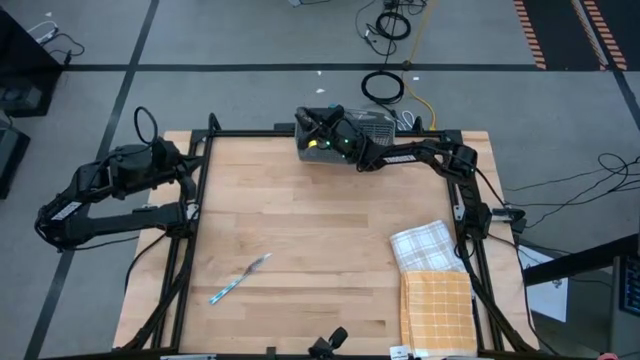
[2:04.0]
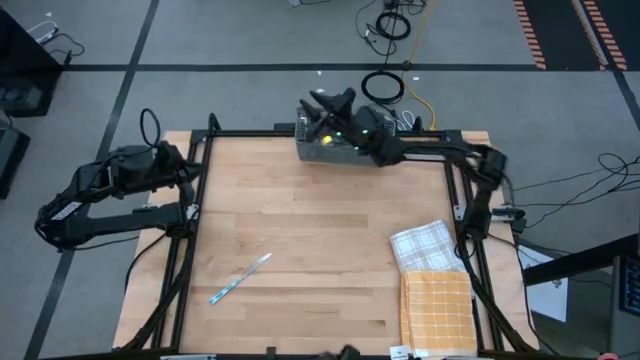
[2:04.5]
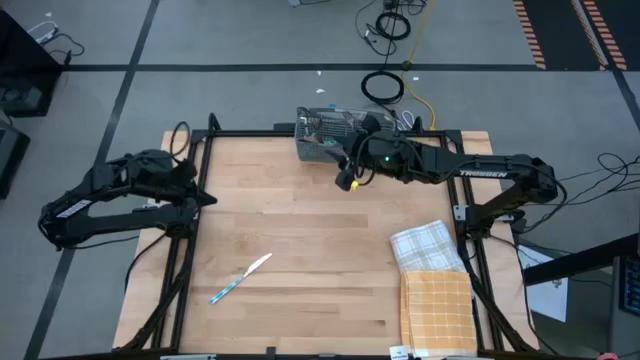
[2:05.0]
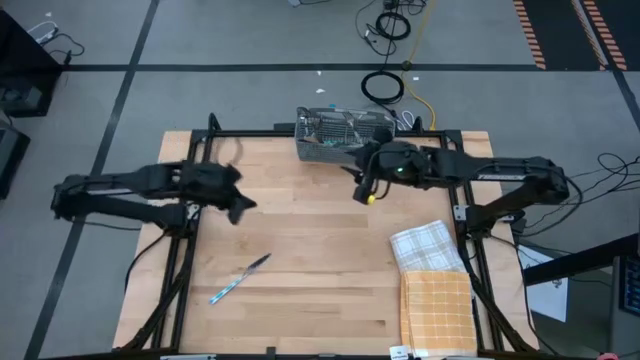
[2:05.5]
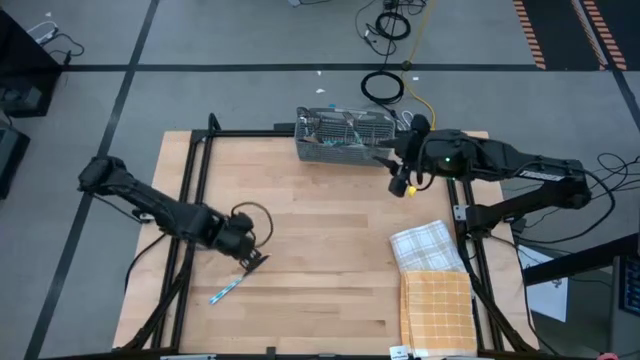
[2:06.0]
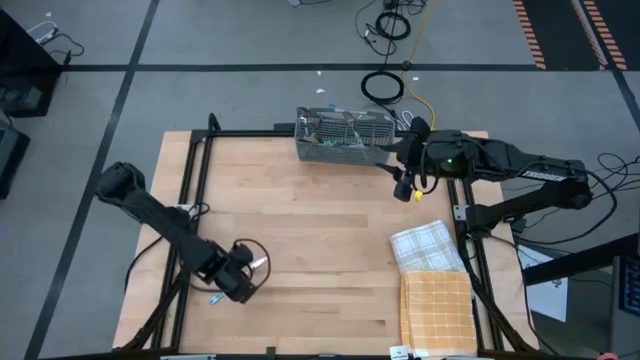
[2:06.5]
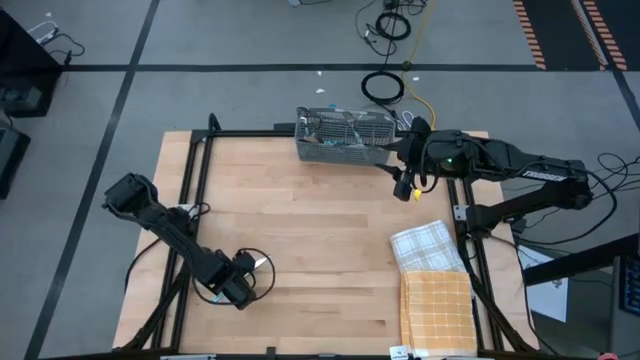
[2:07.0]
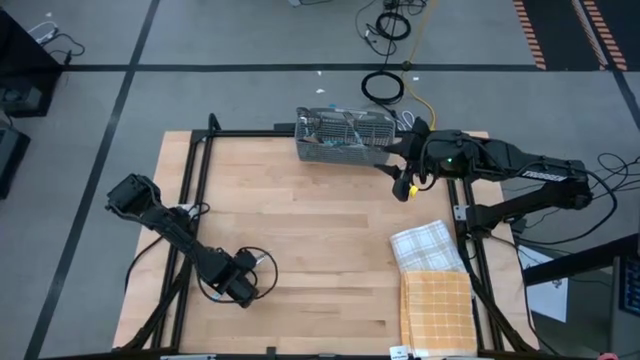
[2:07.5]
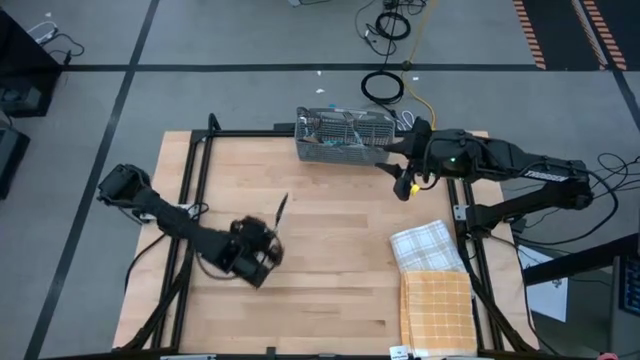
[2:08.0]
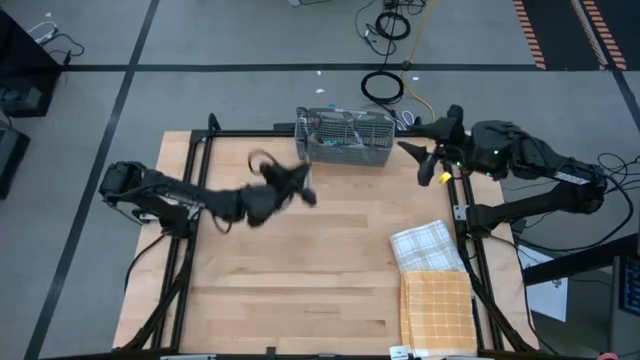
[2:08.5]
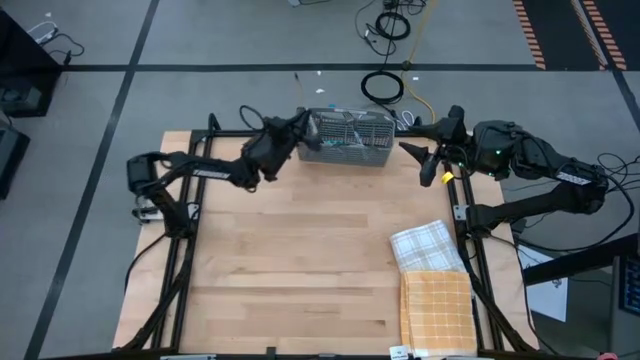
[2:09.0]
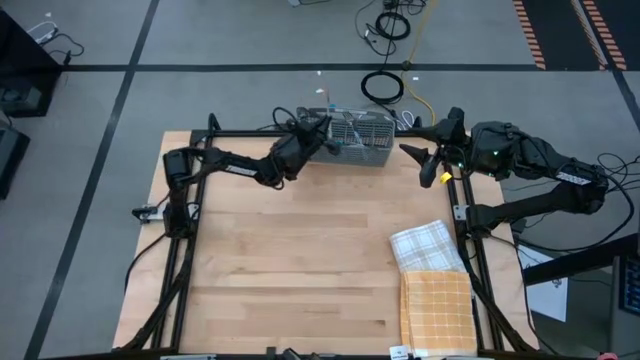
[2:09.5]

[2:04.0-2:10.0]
Task: Sort silverware
Put the blue table knife into the gray silverware basket

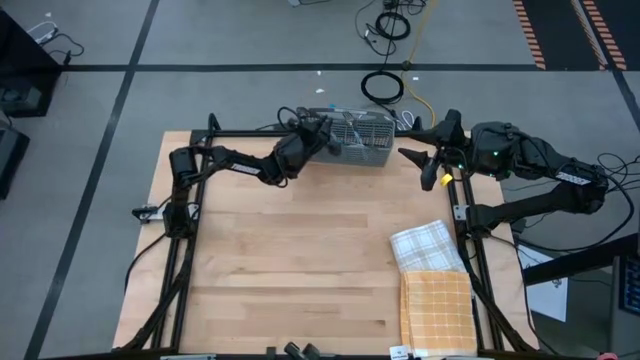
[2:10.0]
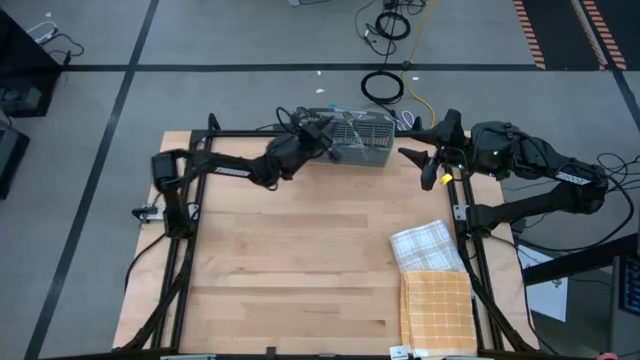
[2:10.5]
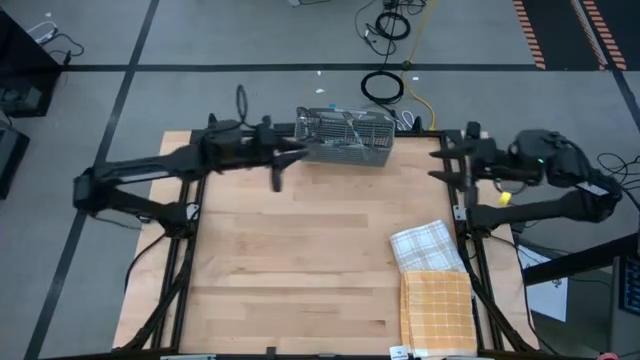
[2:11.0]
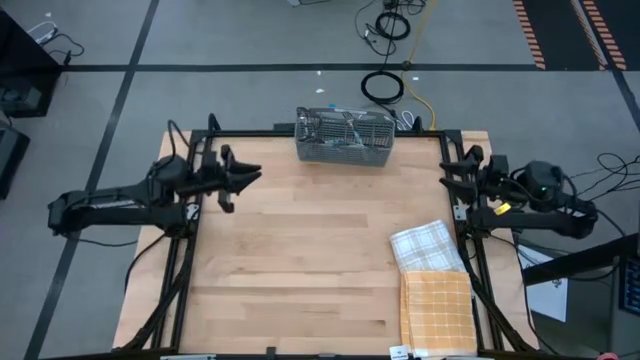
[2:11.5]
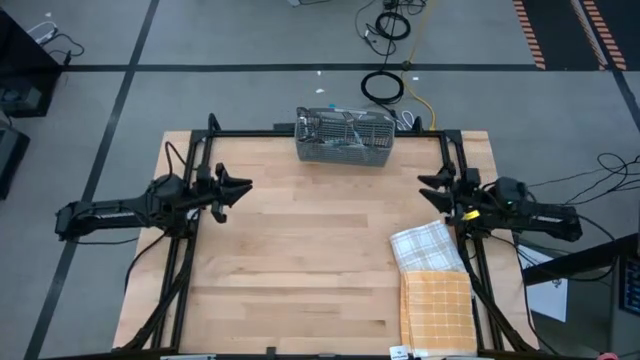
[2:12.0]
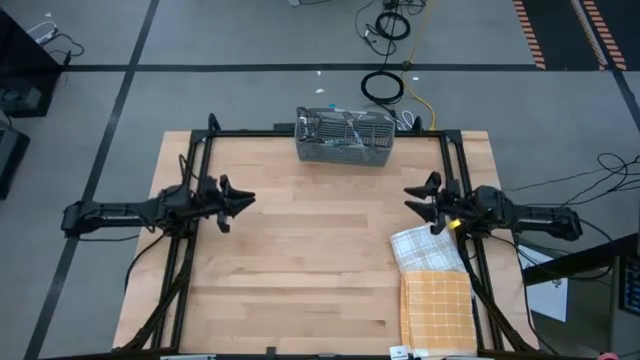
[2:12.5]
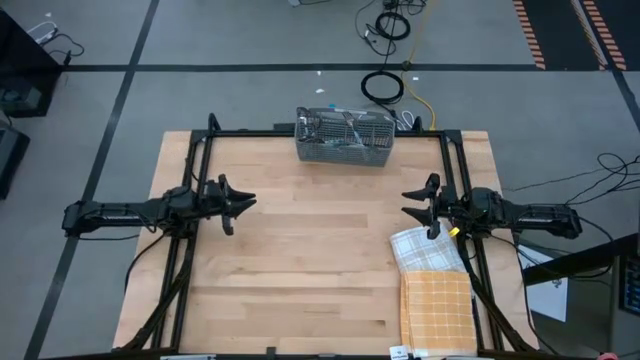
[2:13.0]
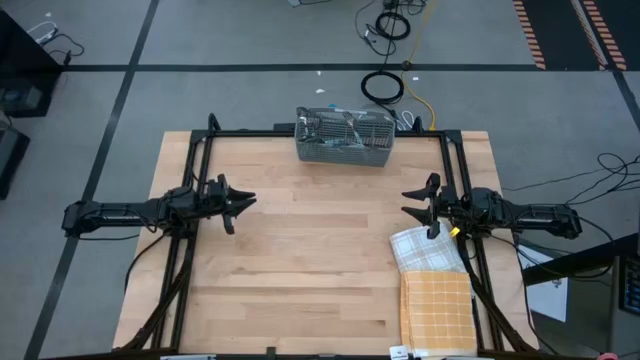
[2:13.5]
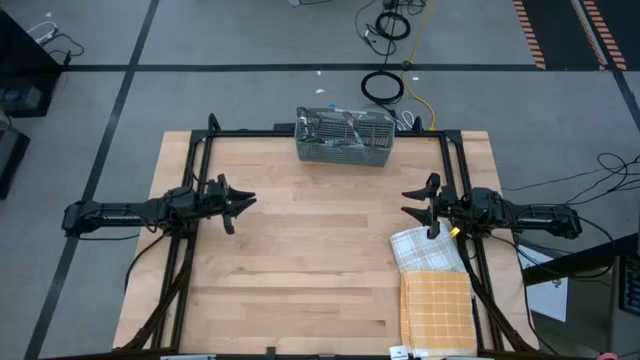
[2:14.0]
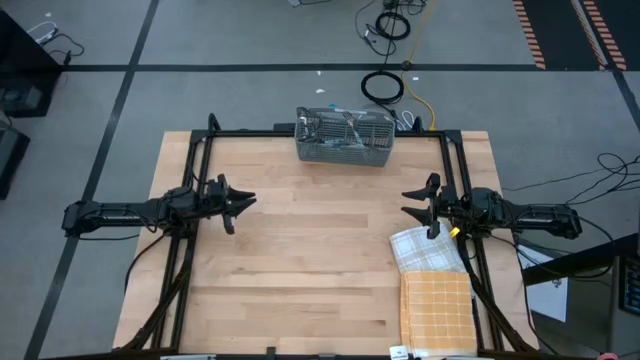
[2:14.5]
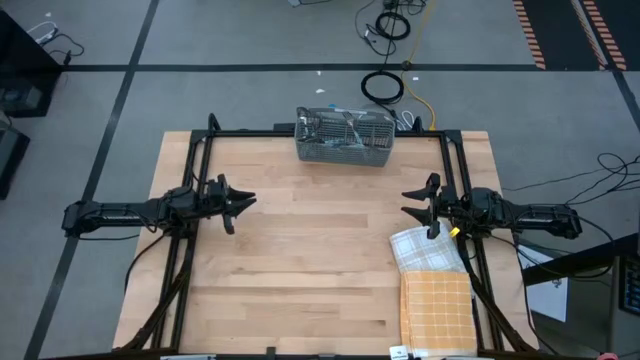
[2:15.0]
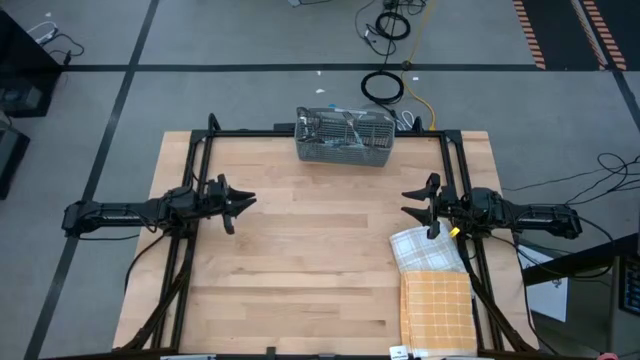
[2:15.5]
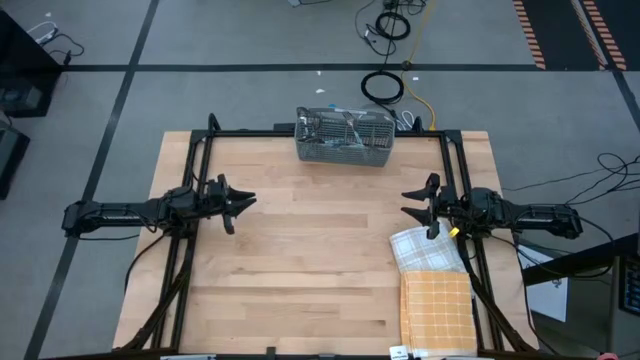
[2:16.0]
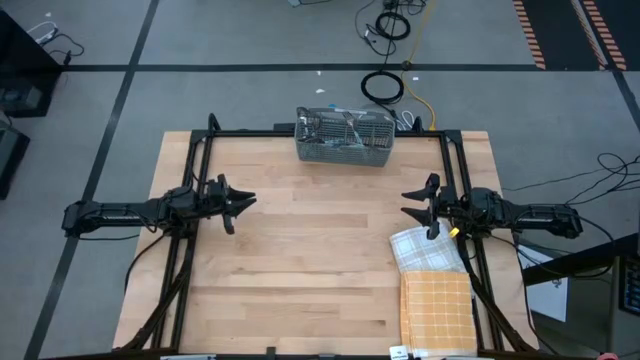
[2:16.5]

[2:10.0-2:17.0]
Return to Home Position

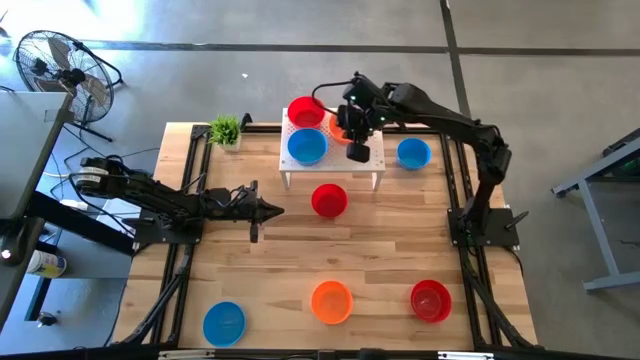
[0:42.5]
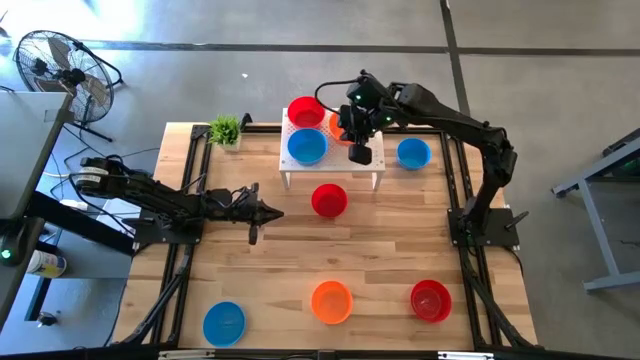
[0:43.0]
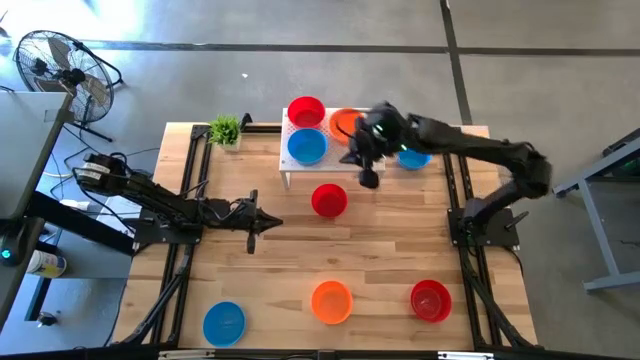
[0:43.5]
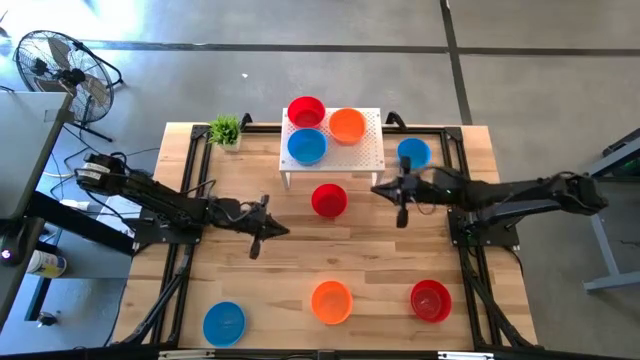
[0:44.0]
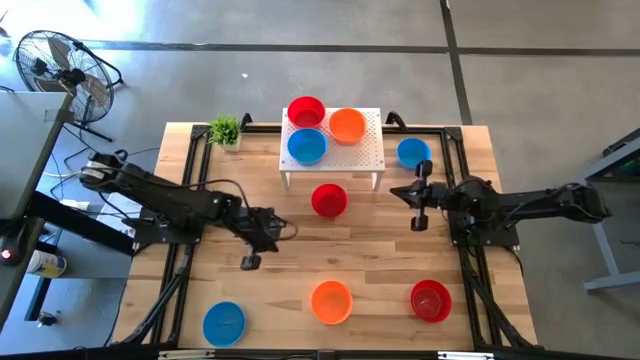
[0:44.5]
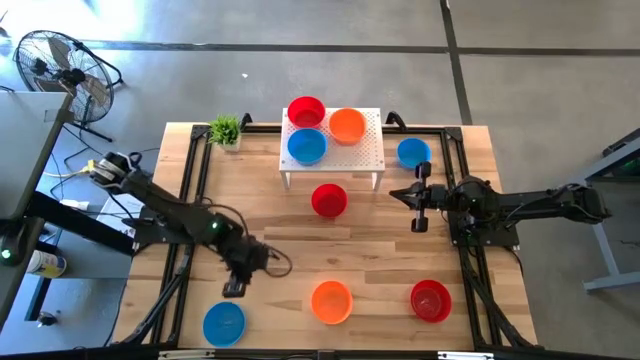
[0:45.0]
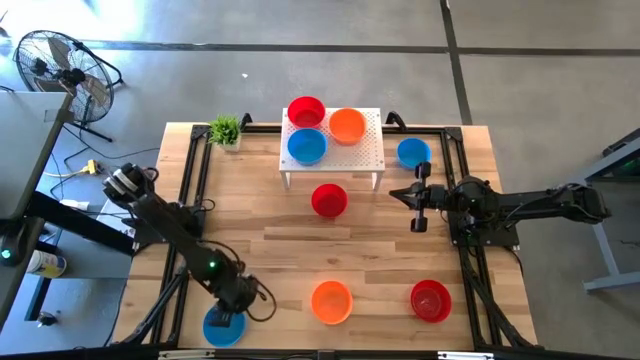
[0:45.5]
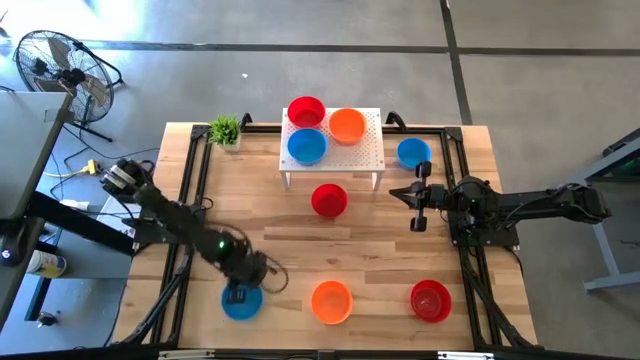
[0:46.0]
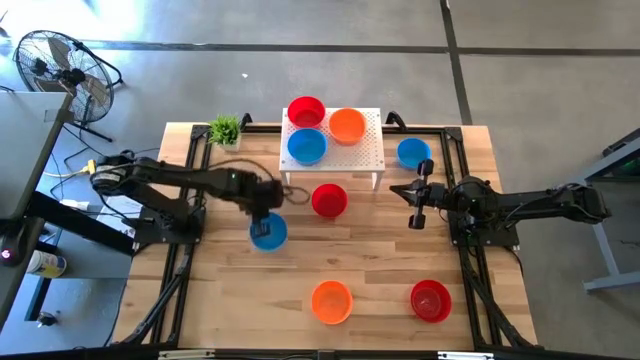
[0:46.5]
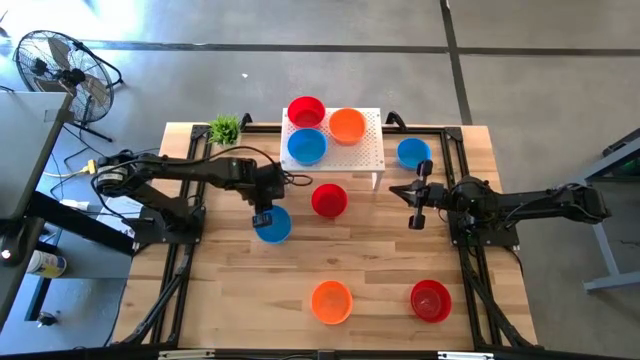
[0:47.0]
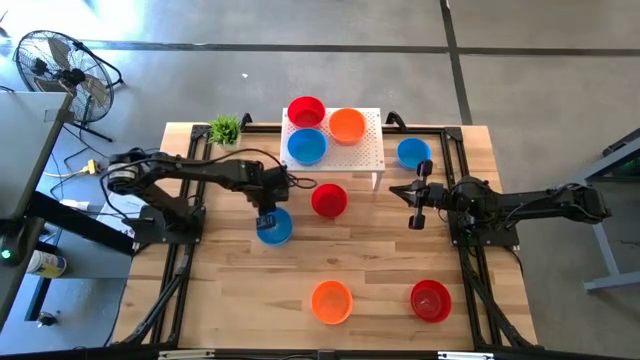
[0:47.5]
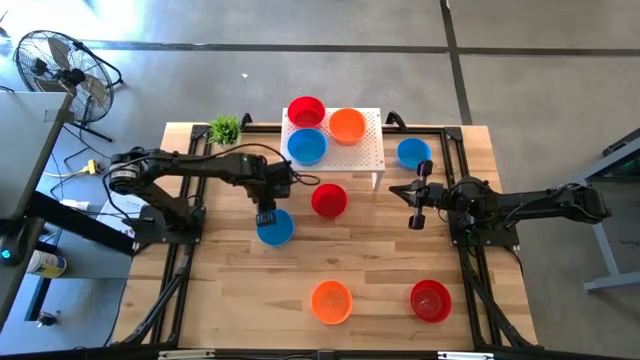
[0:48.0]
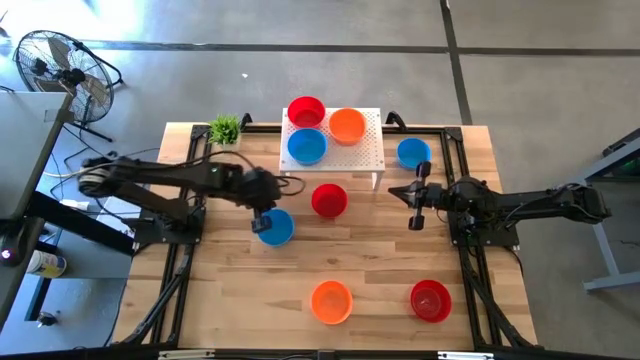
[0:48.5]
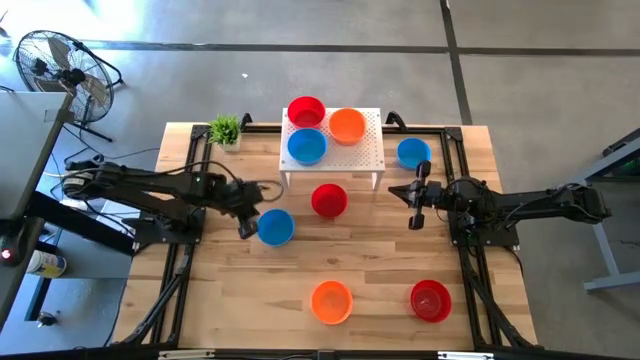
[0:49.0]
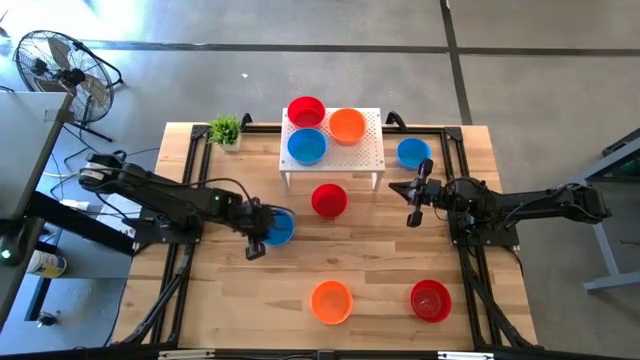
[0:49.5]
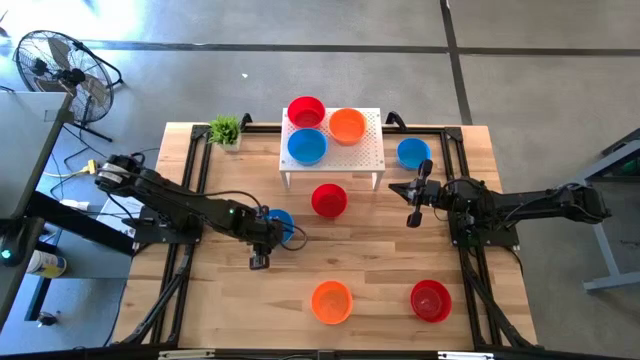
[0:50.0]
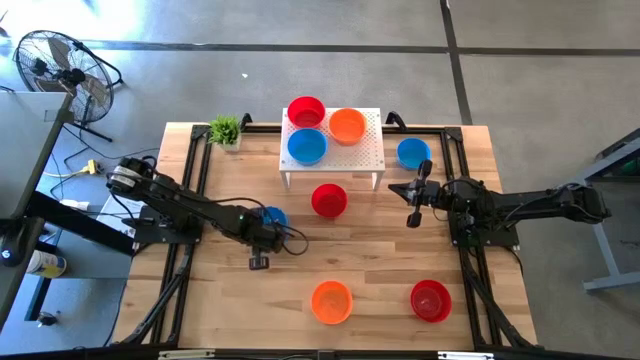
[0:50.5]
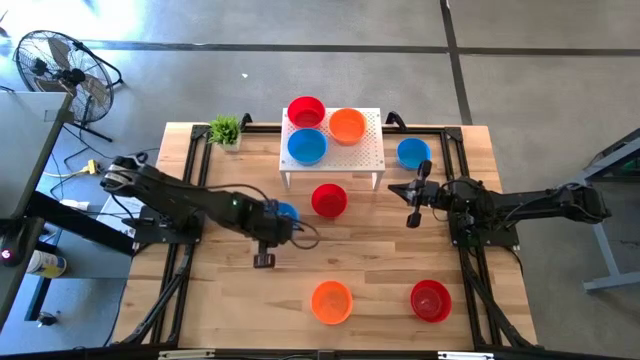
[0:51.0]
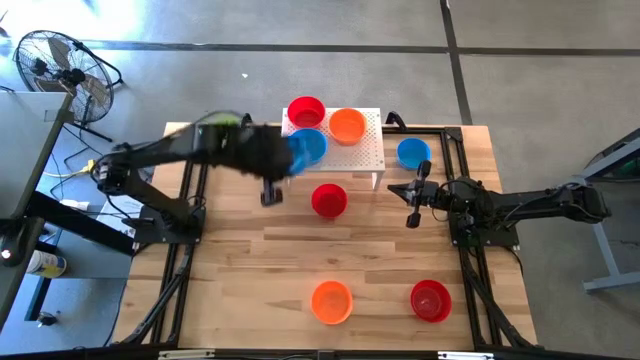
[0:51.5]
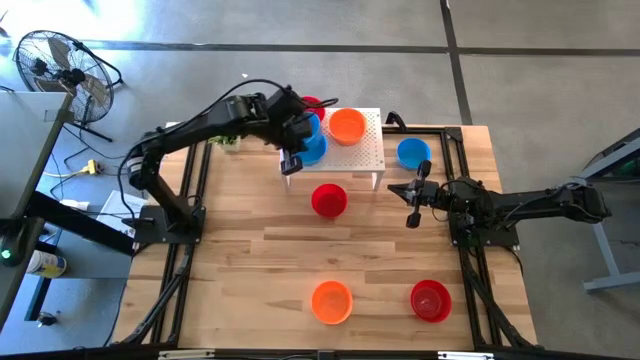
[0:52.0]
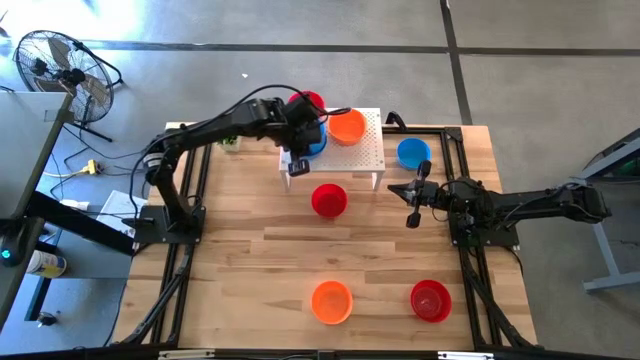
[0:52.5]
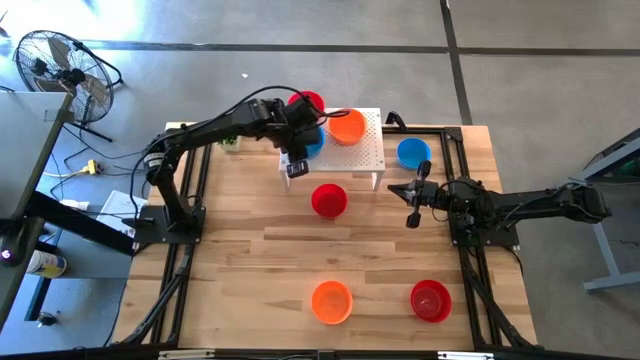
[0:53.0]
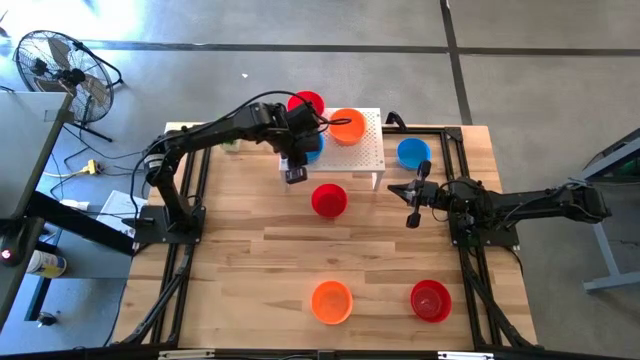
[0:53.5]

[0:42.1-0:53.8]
Task: Pick & Place Mini bowls
Stack the bottom blue bowl on top of the blue bowl on the shelf
